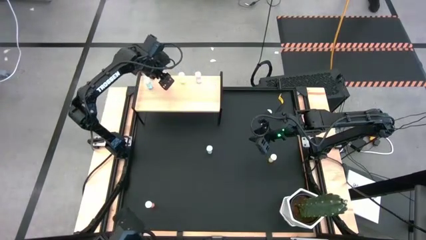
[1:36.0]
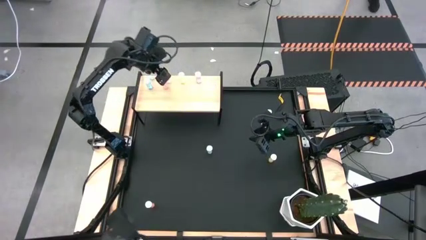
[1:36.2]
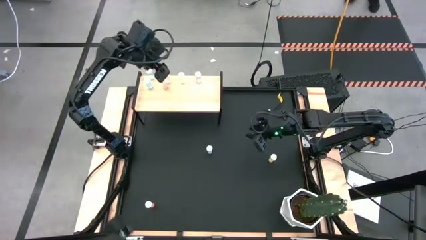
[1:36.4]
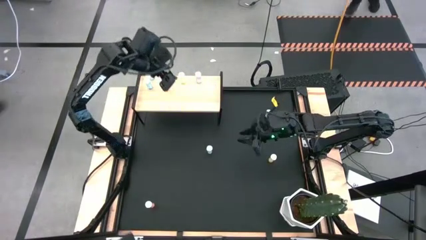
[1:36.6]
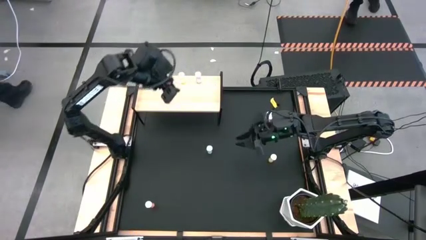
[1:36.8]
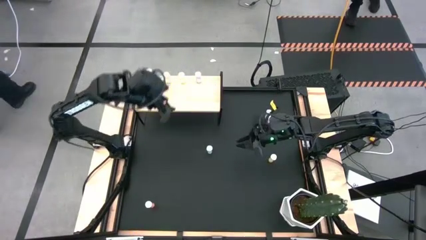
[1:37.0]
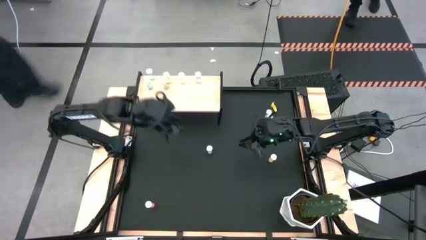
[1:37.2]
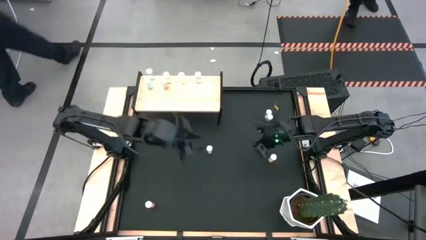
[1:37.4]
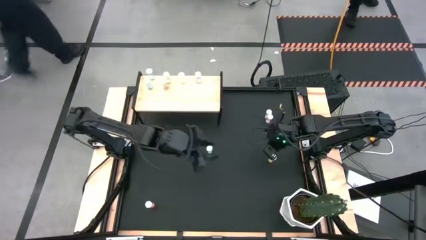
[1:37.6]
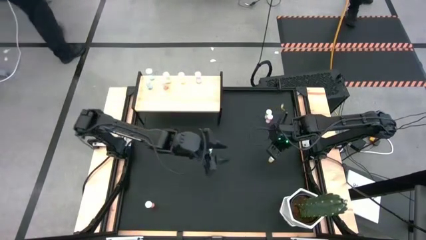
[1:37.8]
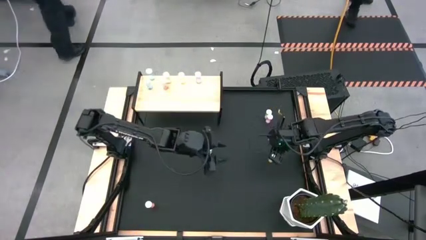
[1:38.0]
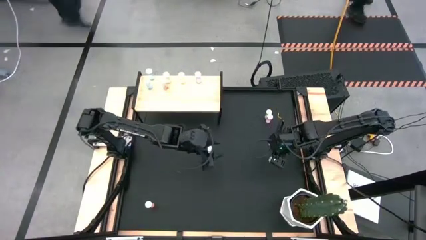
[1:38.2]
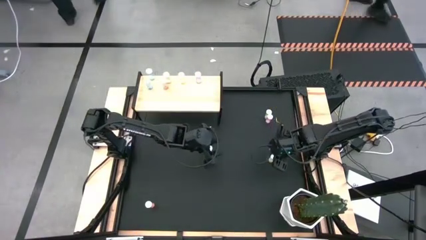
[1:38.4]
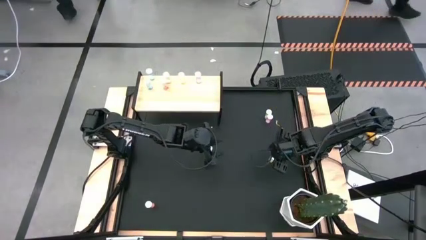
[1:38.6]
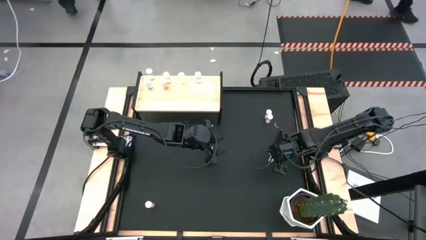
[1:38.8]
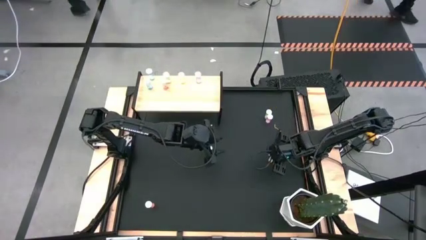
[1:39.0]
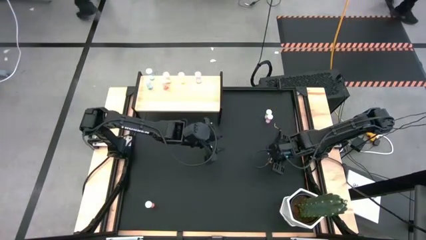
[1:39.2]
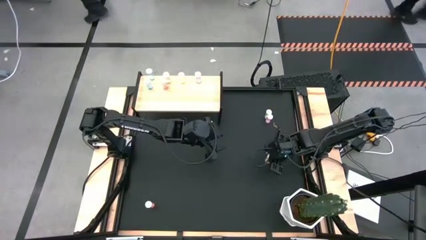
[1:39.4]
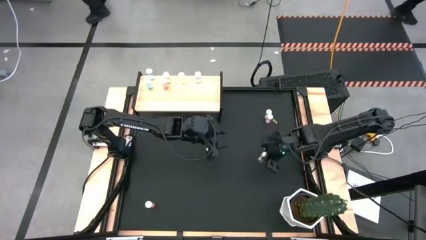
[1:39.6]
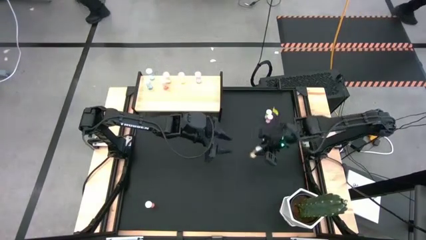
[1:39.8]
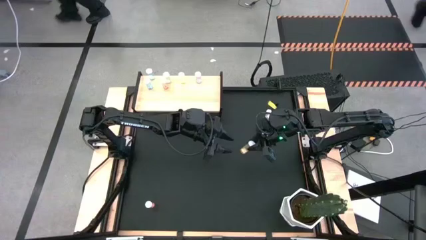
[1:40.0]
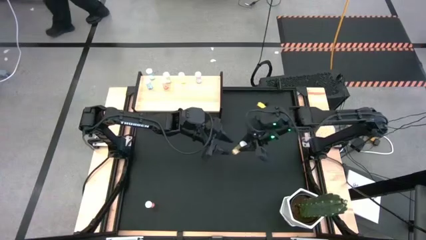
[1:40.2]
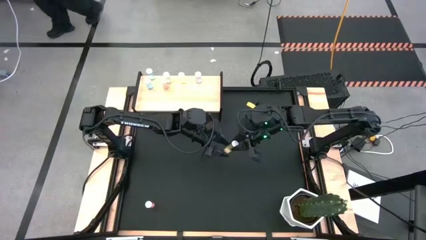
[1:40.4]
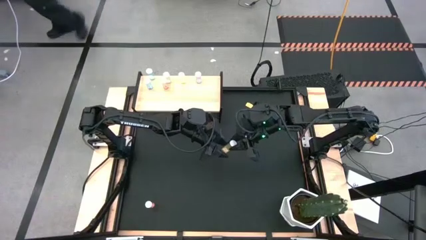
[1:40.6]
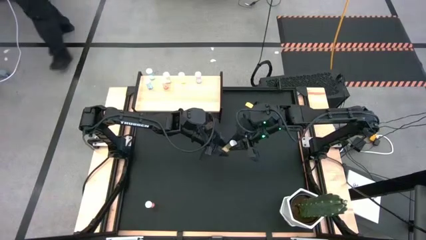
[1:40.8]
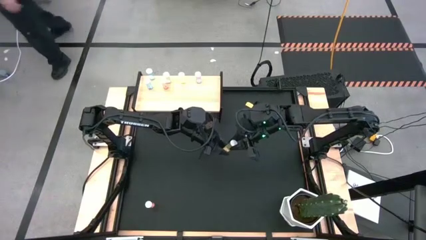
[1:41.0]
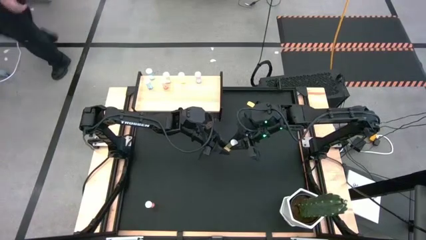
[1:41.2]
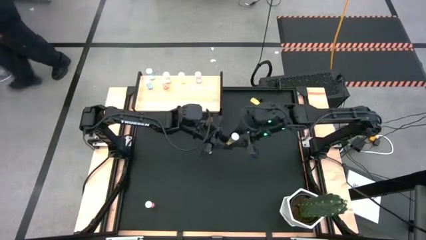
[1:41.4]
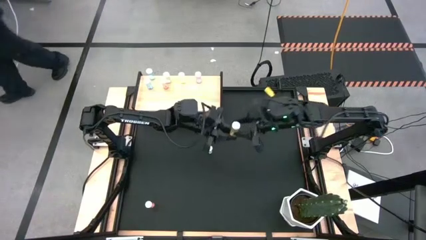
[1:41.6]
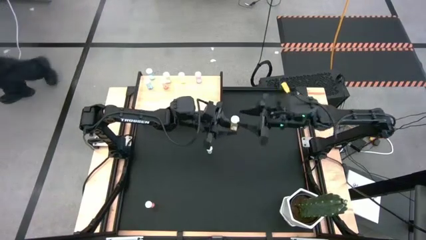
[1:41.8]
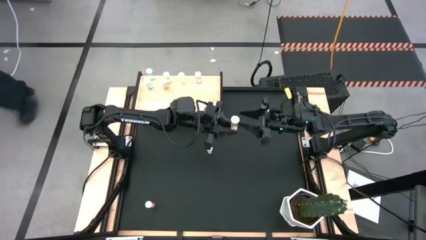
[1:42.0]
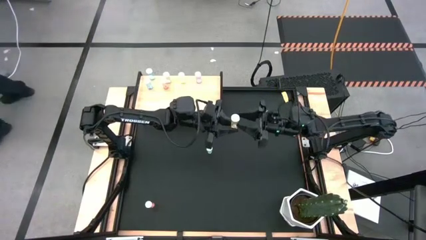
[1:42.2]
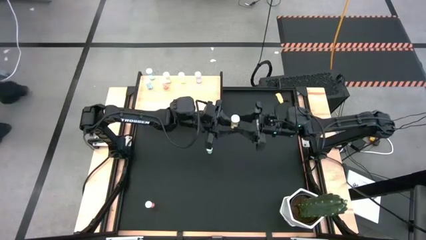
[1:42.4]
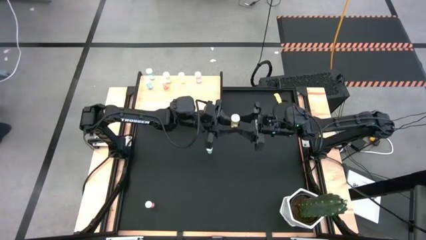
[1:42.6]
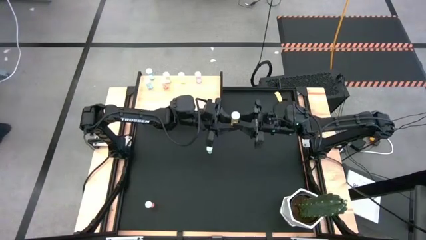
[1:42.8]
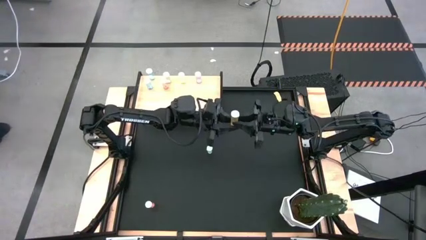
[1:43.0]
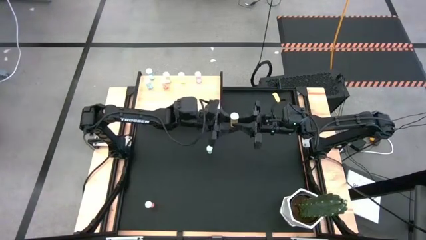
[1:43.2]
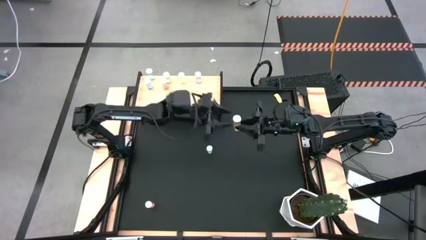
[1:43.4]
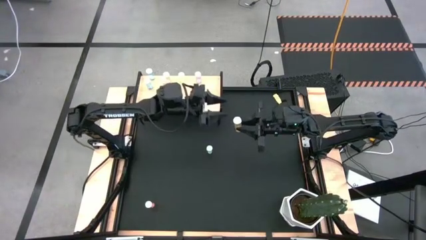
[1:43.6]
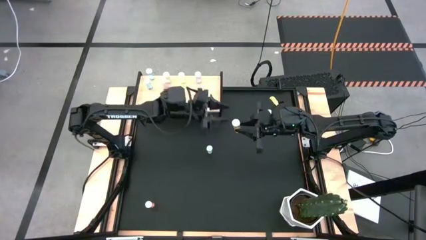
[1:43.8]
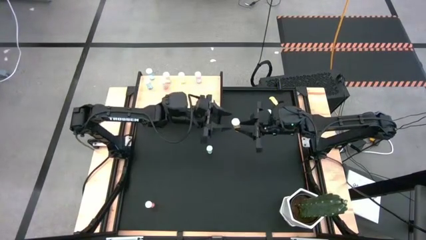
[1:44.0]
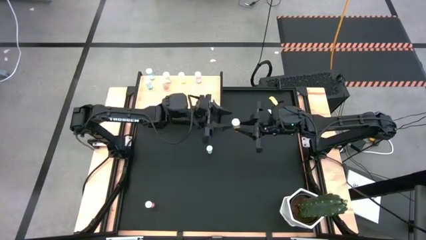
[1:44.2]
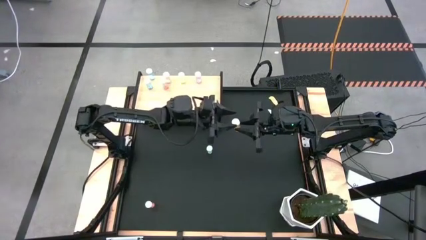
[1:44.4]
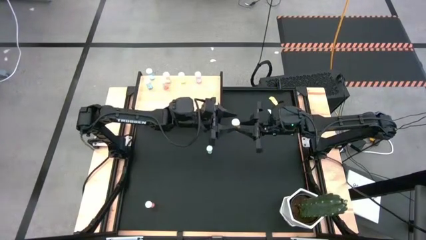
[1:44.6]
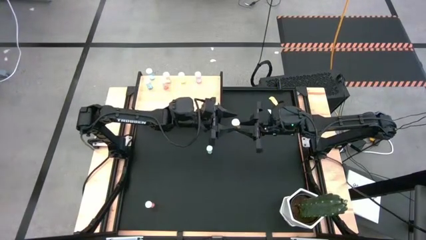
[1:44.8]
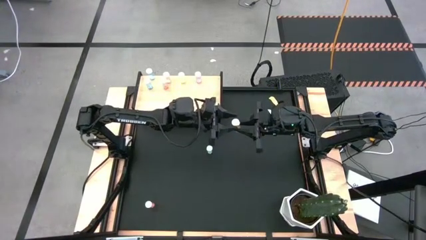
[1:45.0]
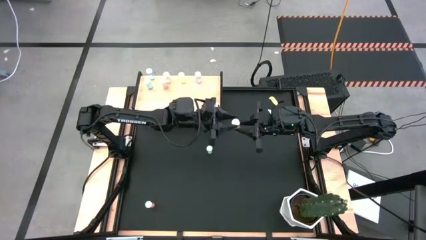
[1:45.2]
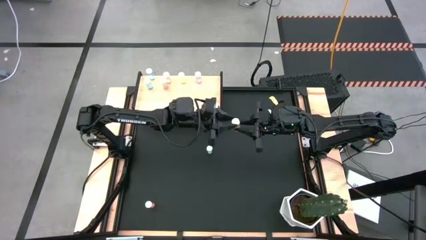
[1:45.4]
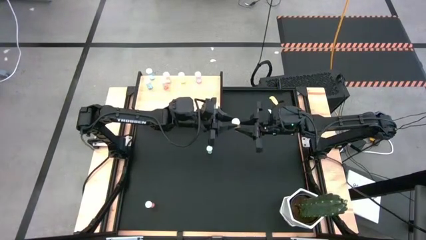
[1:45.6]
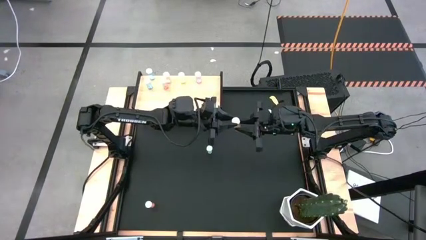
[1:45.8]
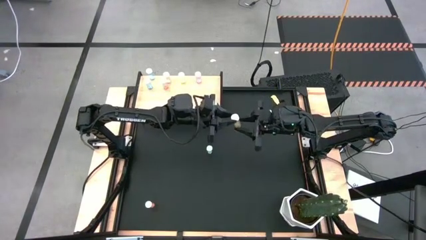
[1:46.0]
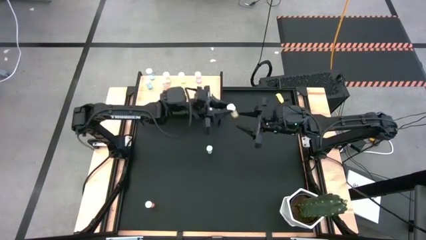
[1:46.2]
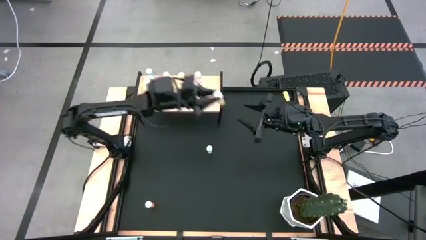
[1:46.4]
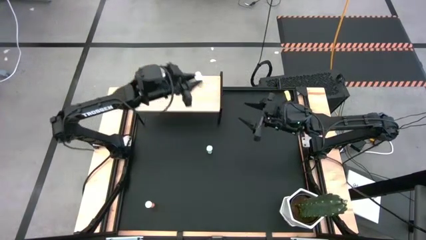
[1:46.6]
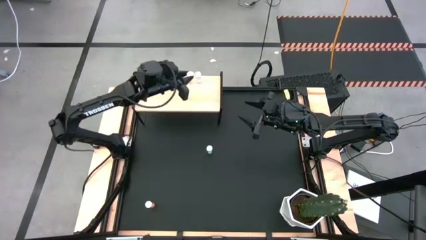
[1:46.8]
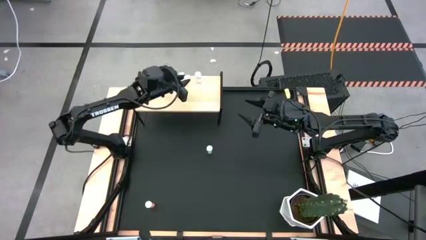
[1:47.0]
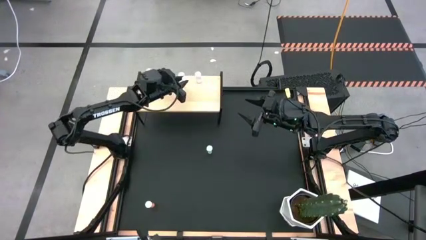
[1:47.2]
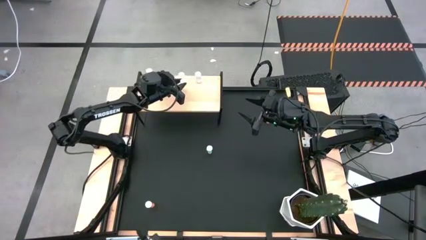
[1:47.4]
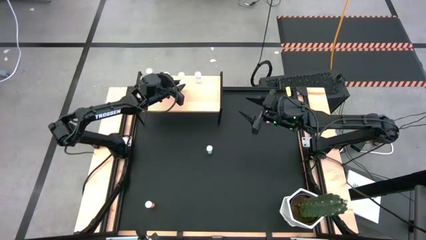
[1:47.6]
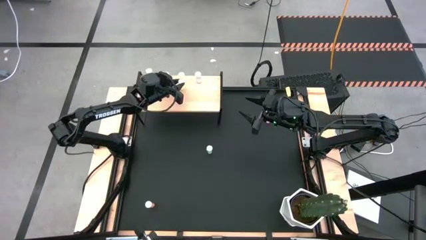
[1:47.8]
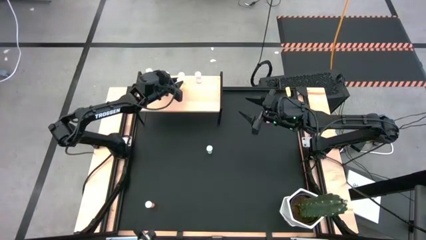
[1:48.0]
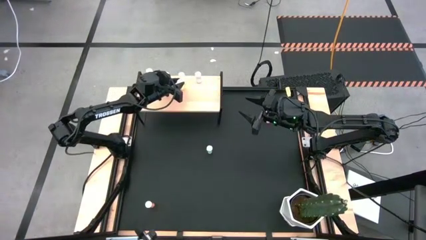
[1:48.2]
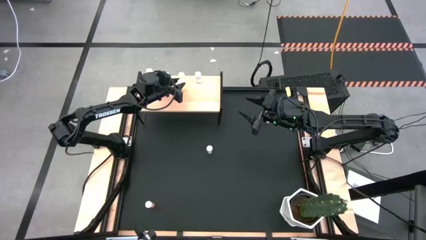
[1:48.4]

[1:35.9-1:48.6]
Task: Pick and place medicine bottles onto shelf by color
Put the bottom yellow pill bottle on the shelf aligned with the yellow pill bottle
